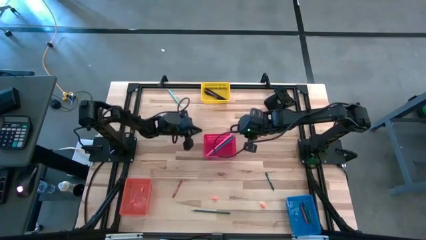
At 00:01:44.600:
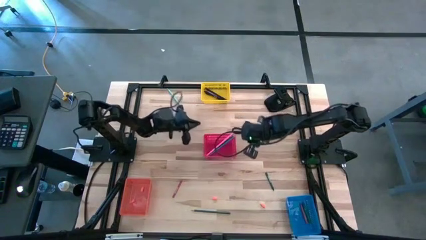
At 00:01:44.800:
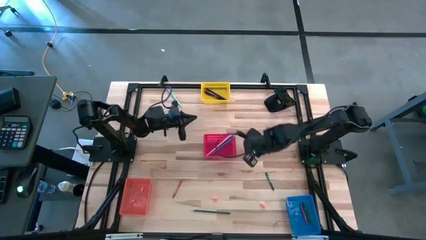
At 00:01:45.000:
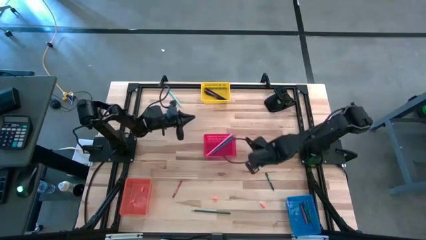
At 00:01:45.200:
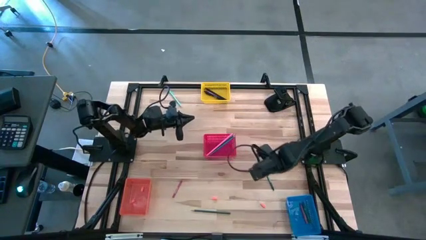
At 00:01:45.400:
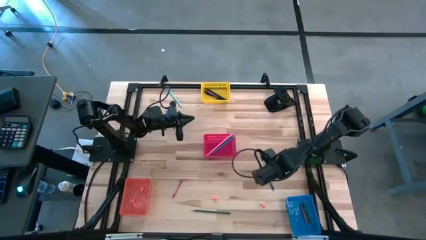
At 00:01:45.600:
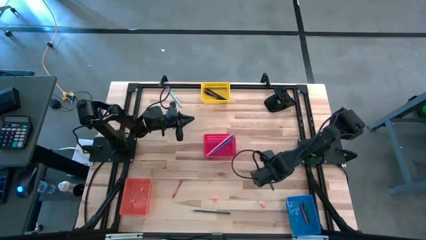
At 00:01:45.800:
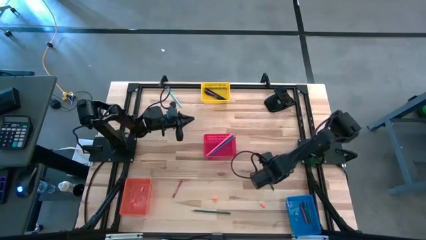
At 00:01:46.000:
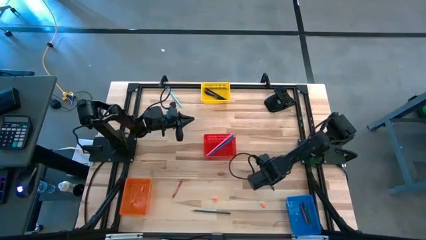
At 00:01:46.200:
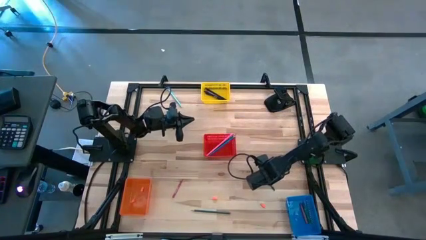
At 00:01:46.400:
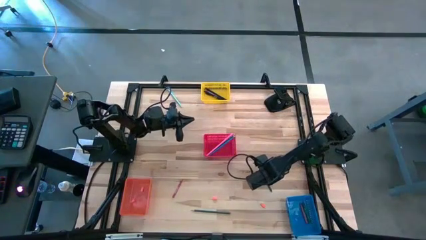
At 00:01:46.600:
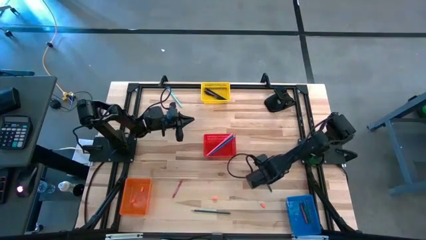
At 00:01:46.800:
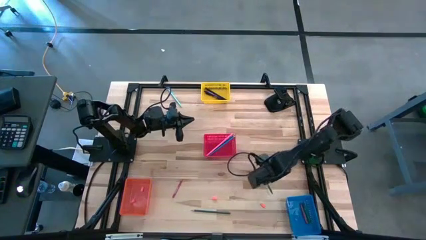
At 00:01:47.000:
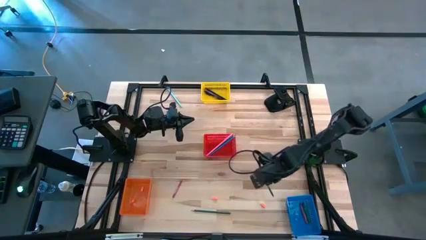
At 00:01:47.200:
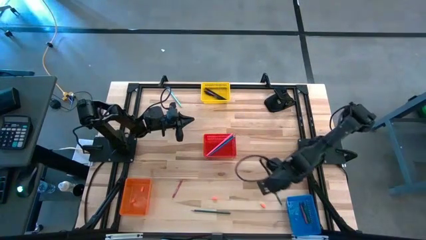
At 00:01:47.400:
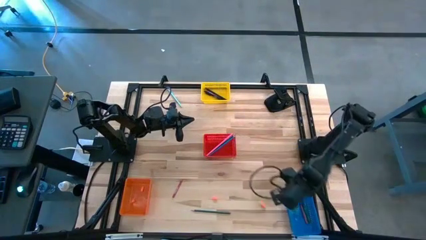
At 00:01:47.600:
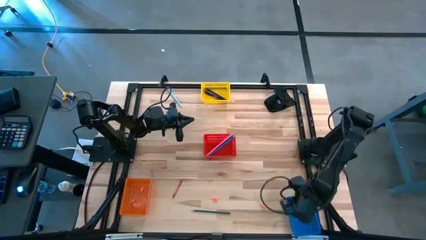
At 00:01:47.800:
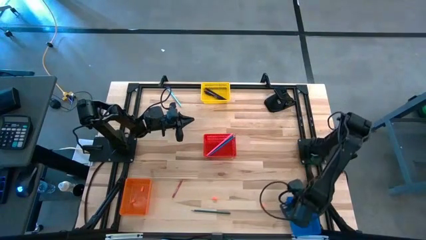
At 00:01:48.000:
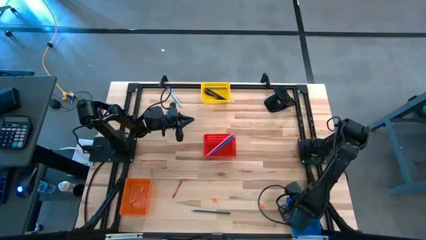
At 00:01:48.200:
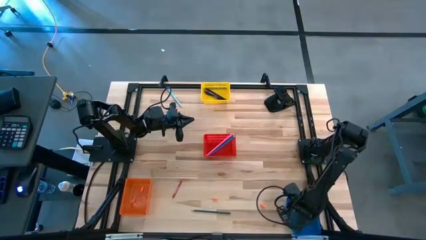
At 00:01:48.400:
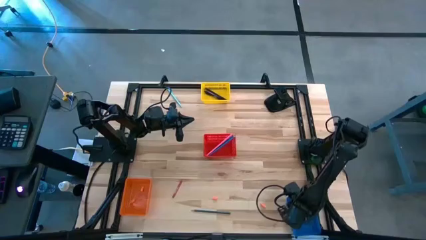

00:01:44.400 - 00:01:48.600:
Task: Sort crayons/erasers/pens/pencils in bins
Put the green crayon into the blue bin

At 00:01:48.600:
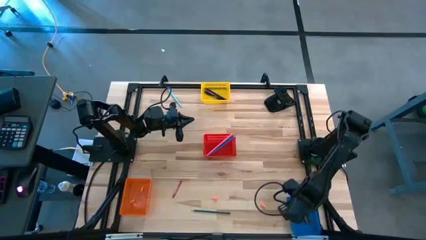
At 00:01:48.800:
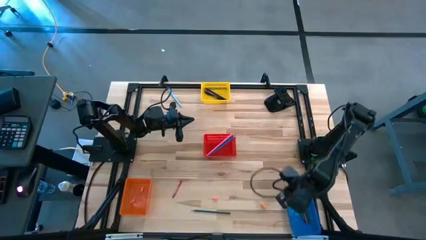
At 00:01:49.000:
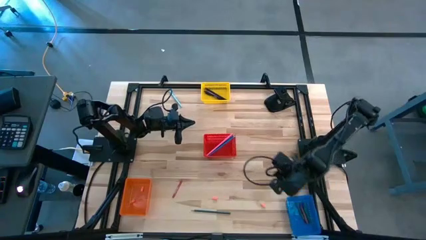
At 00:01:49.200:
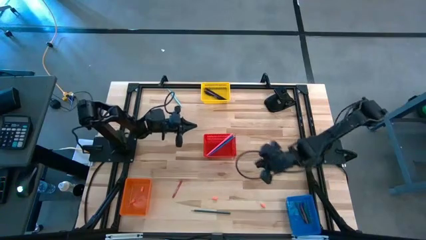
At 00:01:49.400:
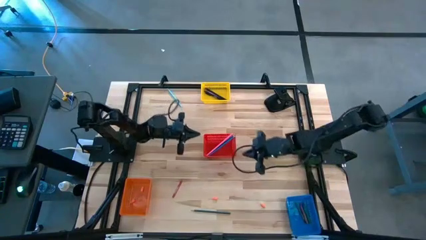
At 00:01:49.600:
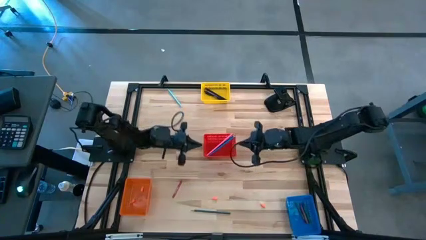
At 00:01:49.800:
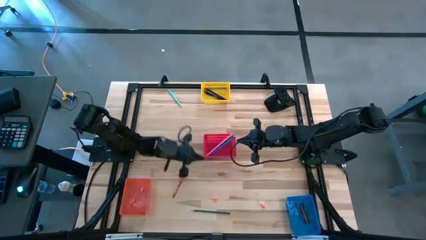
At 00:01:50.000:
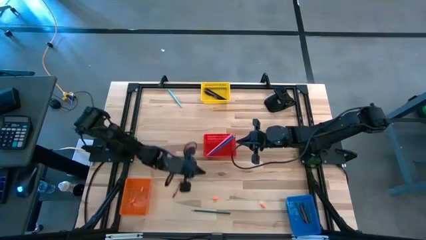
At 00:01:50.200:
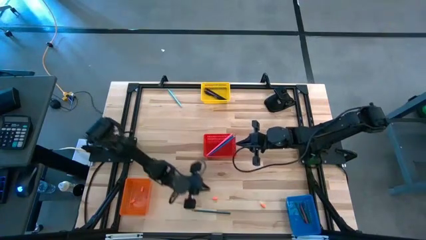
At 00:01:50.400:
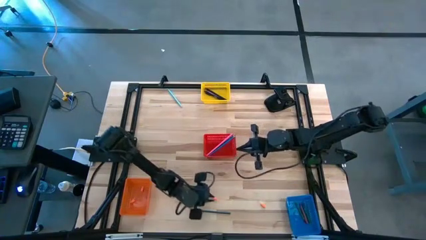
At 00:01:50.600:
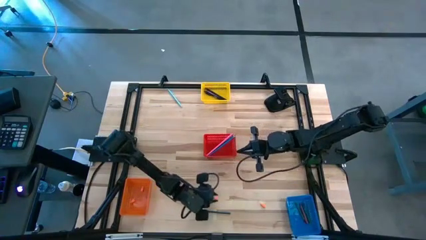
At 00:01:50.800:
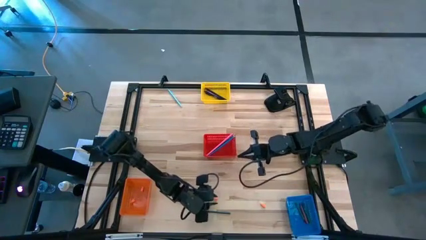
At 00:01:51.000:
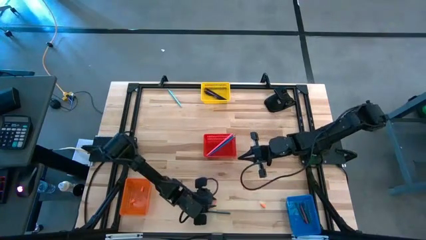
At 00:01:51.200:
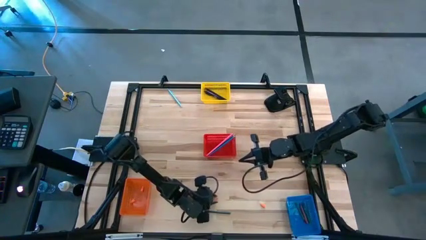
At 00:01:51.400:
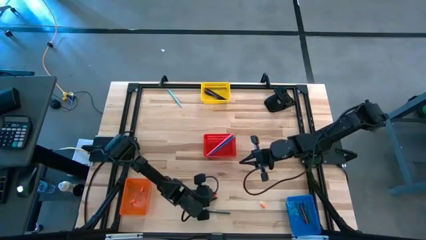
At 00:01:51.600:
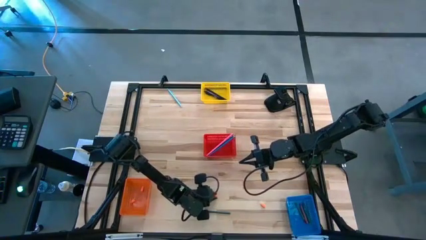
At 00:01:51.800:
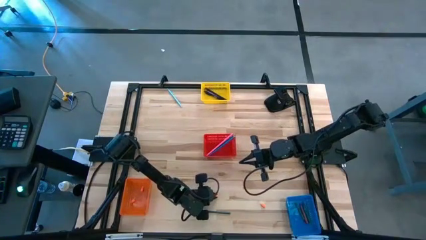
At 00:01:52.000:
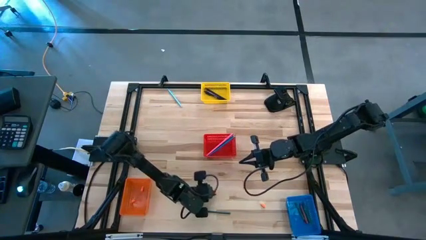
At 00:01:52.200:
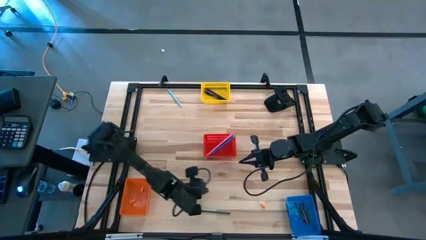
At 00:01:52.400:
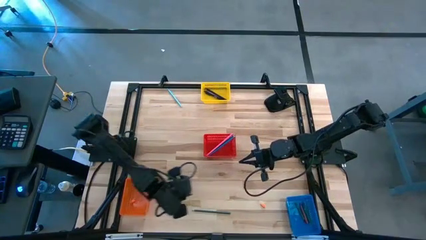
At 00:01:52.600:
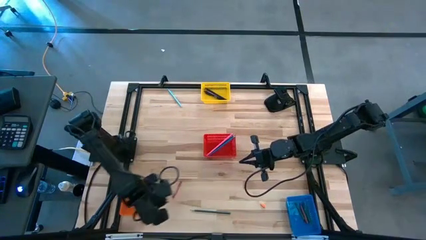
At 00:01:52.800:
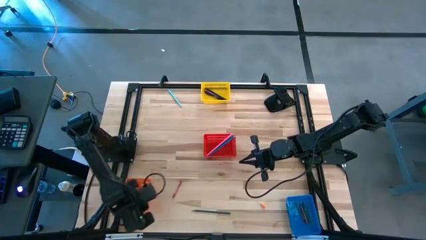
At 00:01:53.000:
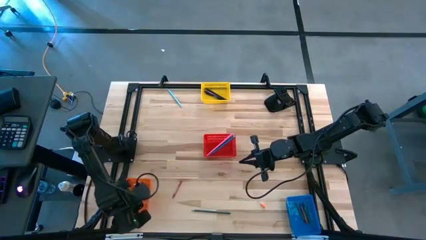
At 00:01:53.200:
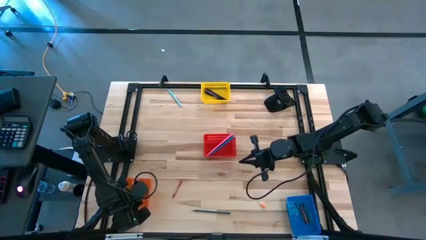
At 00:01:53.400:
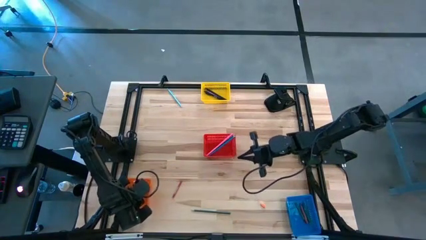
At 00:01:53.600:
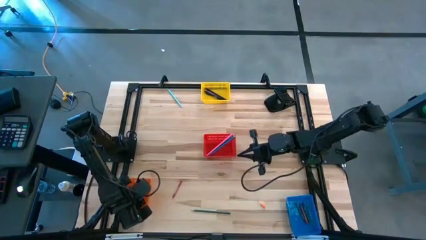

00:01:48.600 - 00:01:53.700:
Put the orange eraser into the orange bin

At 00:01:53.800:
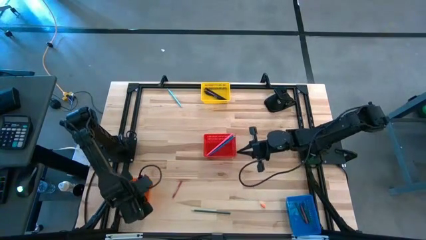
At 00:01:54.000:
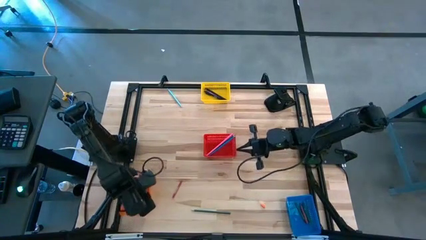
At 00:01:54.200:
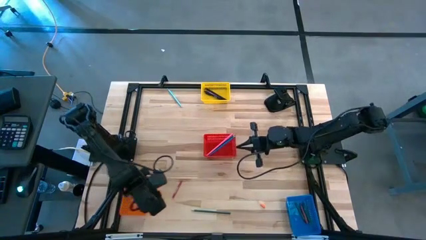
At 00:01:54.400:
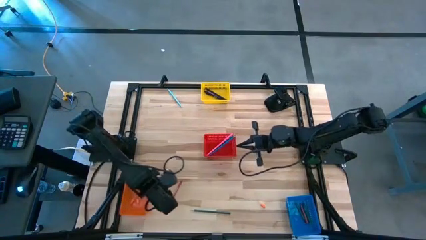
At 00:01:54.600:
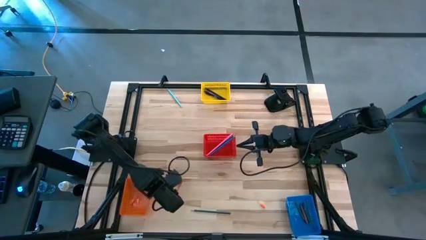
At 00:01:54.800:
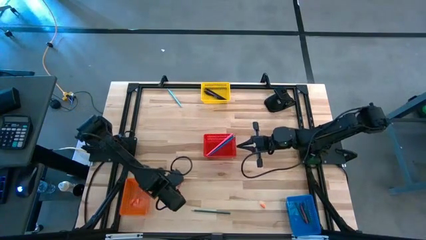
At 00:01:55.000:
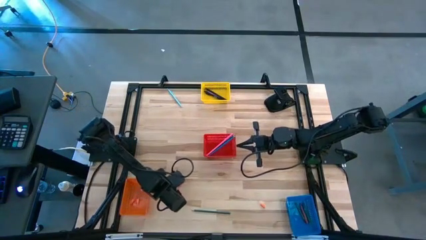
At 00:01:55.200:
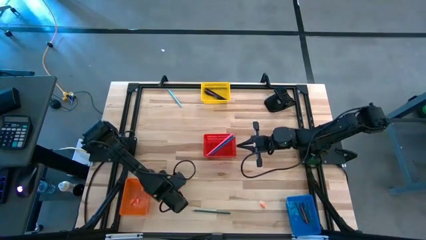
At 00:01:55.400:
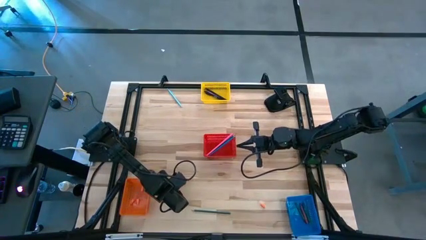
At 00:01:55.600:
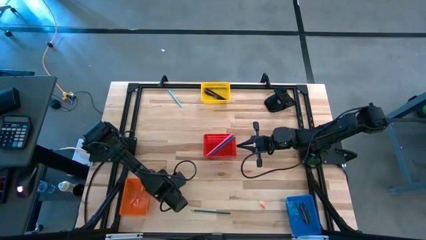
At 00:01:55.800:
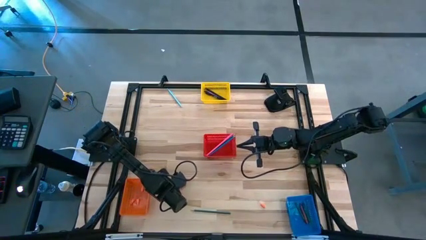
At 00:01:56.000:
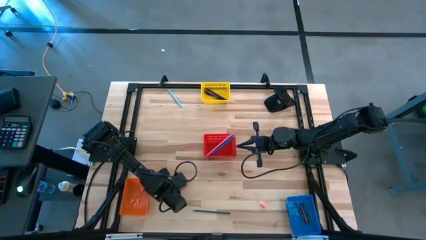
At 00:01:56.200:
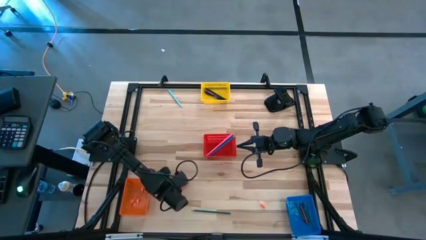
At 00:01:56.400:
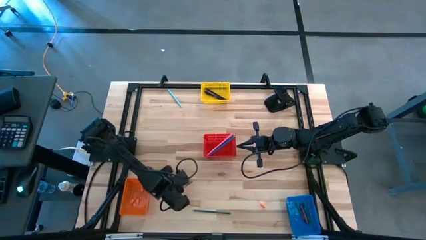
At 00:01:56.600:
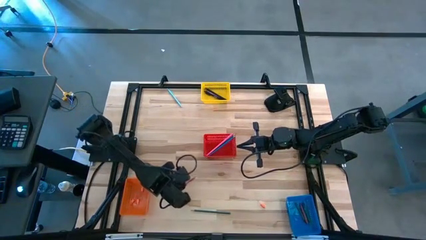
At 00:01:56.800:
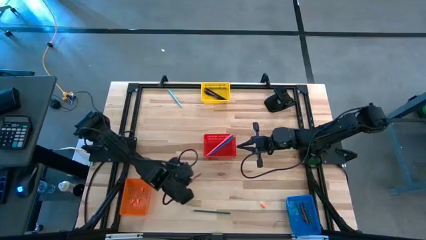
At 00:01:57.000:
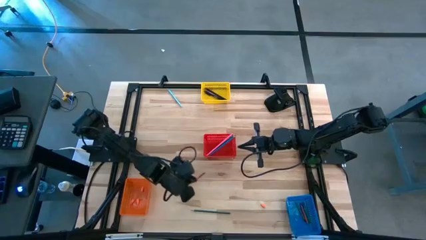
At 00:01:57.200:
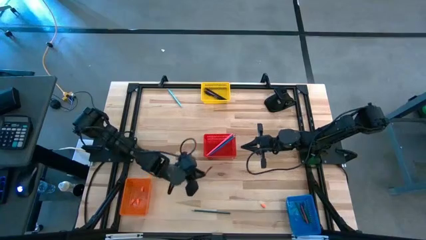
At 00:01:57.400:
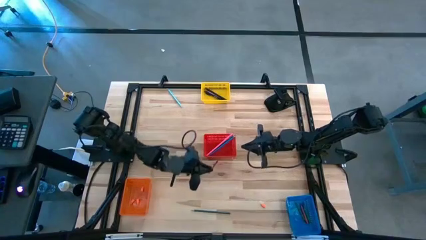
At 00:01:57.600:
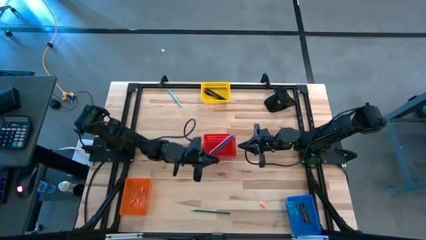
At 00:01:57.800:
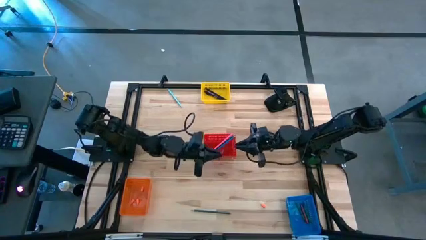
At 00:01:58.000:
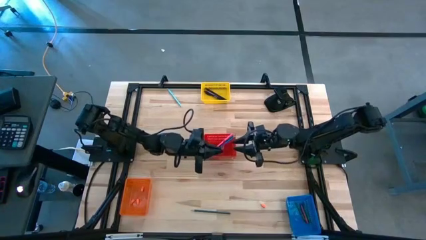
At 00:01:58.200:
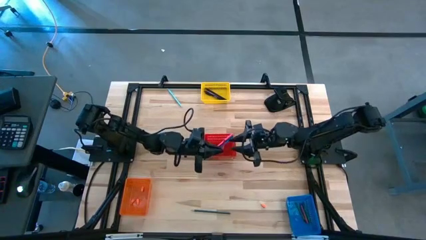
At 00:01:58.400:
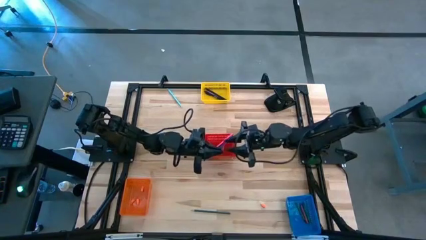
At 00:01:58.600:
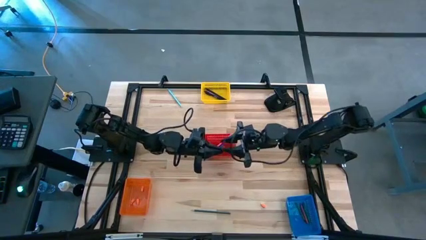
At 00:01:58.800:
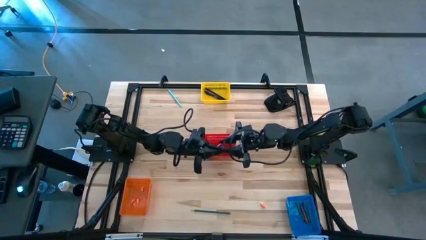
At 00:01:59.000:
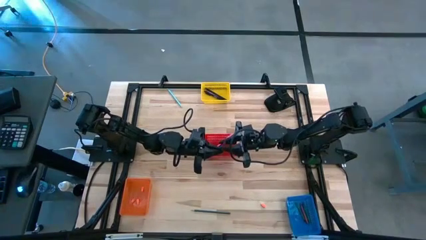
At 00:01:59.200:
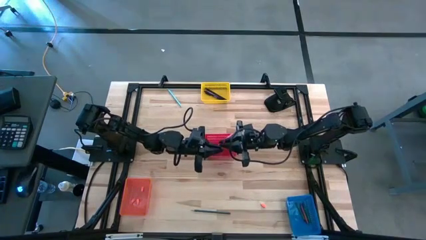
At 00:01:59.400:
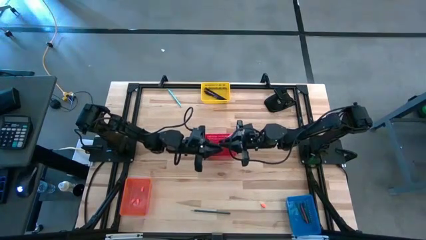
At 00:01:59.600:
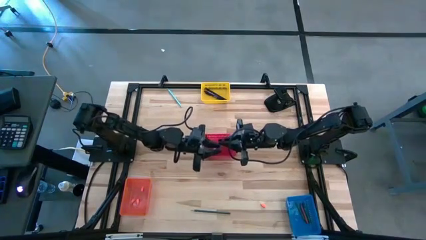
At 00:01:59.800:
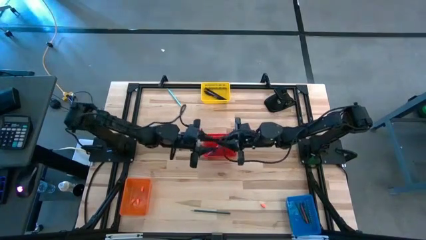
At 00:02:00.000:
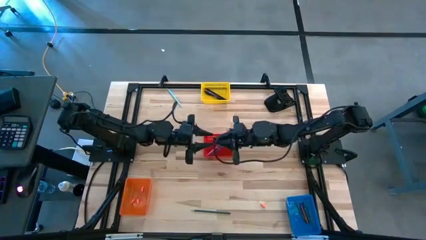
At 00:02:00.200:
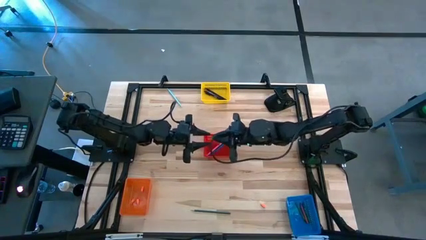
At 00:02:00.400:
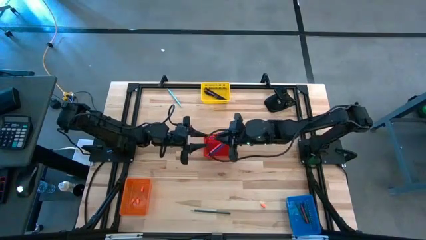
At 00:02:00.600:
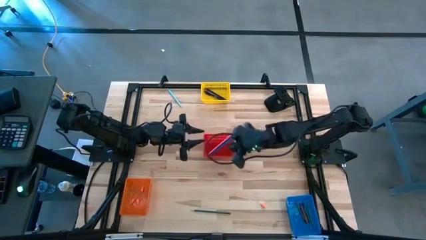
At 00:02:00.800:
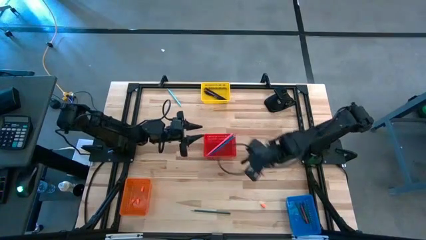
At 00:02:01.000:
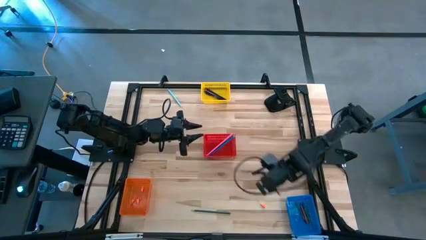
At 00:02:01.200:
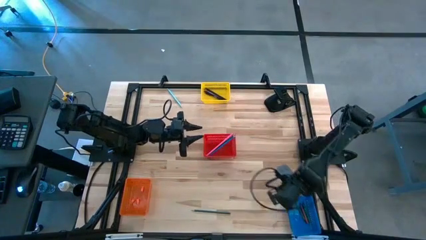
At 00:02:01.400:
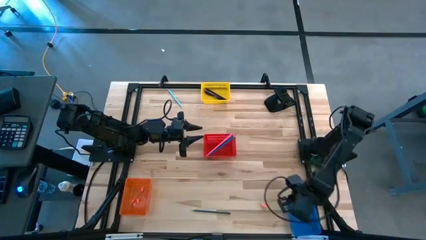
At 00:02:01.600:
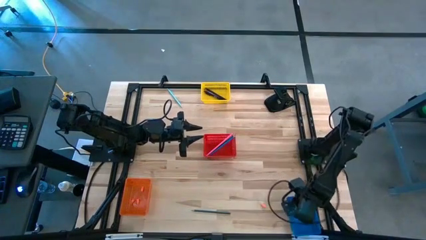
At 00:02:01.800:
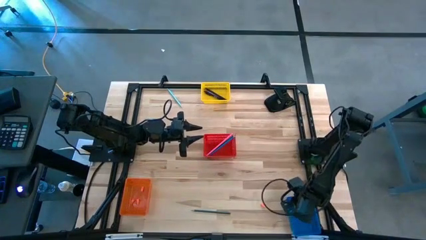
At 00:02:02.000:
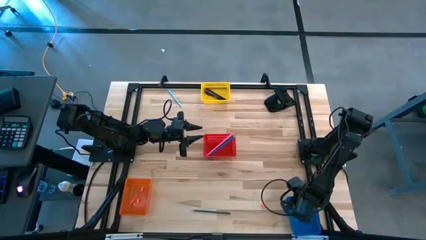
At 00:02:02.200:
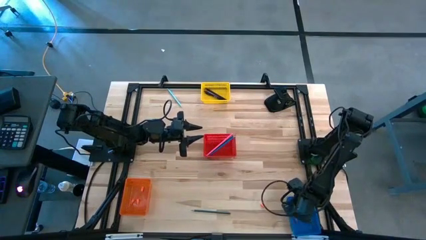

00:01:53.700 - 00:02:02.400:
Put the red crayon into the blue bin
